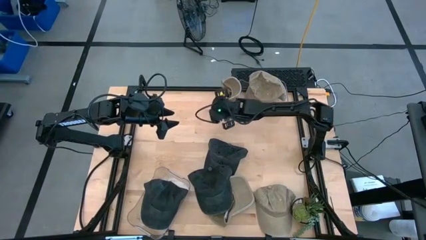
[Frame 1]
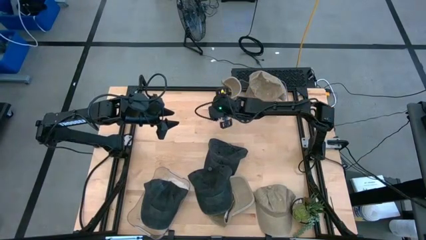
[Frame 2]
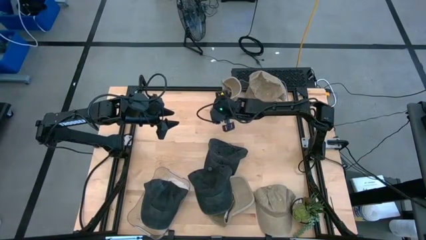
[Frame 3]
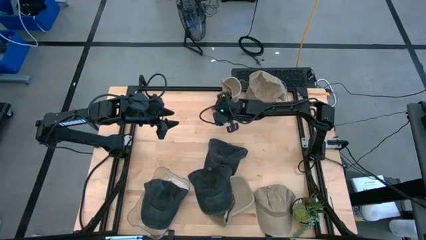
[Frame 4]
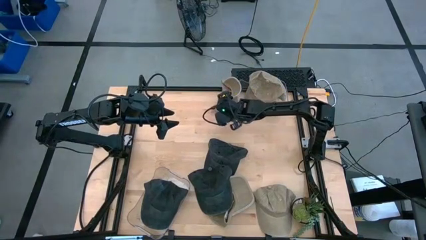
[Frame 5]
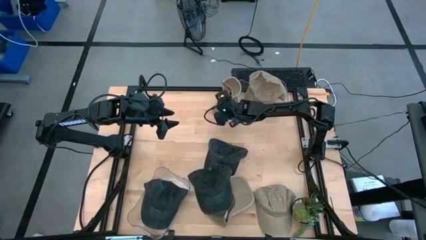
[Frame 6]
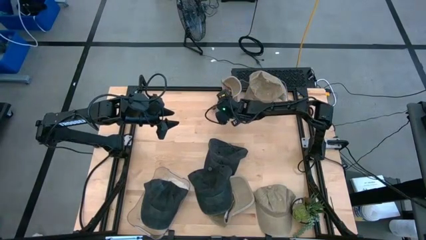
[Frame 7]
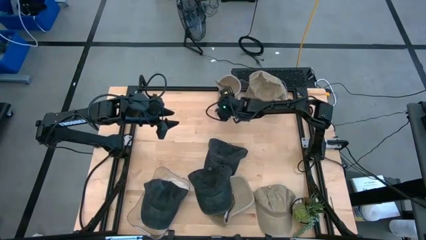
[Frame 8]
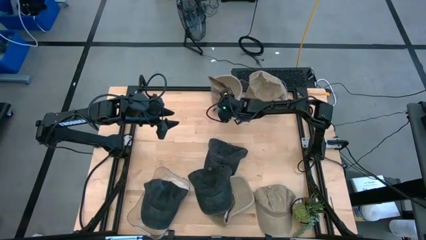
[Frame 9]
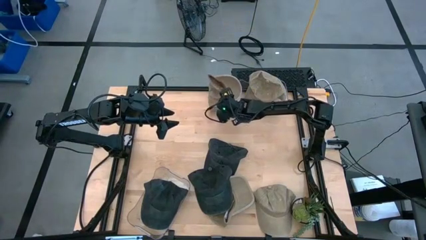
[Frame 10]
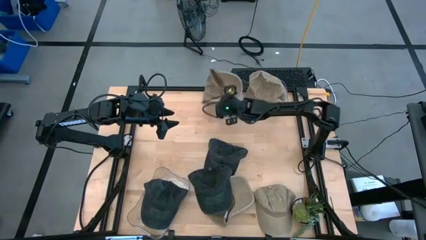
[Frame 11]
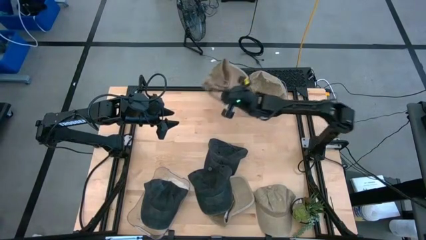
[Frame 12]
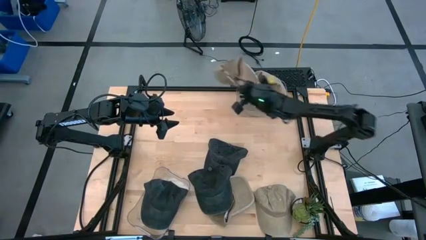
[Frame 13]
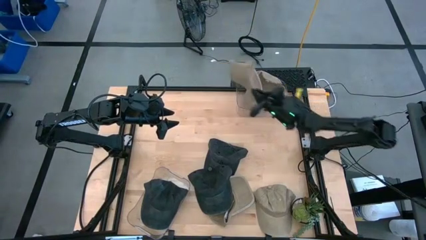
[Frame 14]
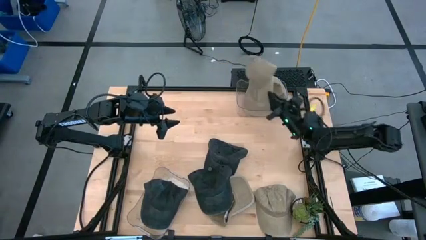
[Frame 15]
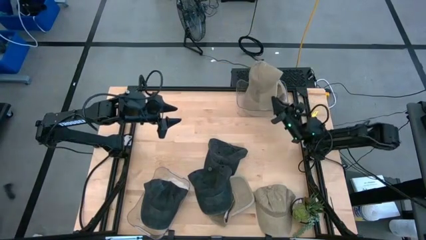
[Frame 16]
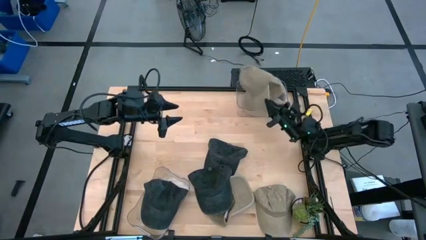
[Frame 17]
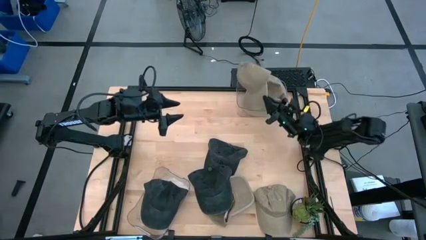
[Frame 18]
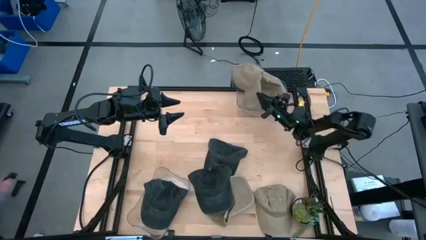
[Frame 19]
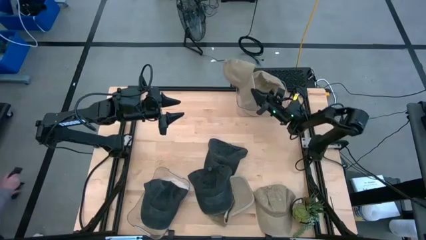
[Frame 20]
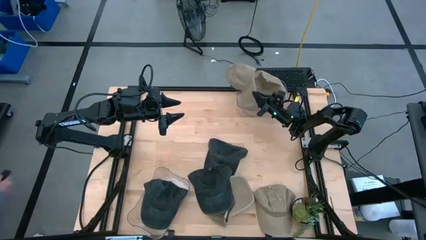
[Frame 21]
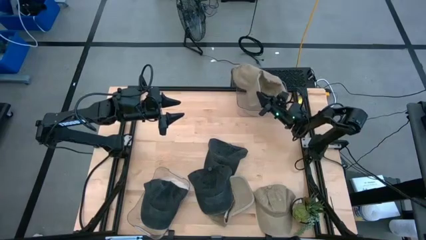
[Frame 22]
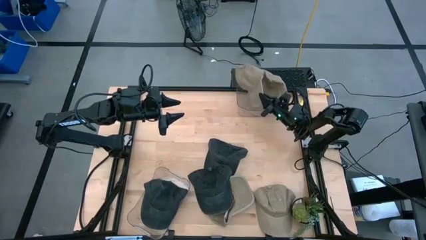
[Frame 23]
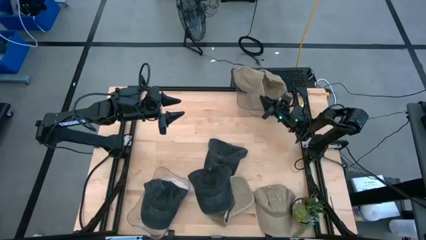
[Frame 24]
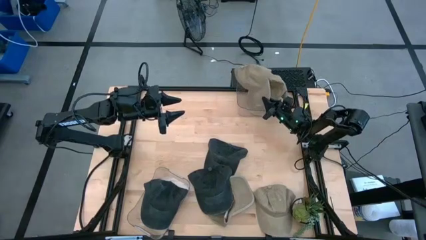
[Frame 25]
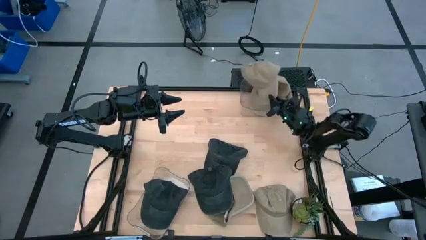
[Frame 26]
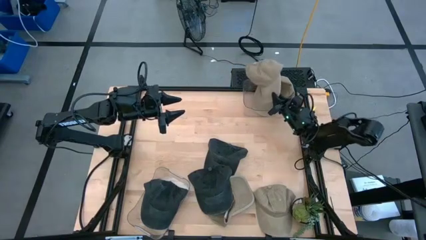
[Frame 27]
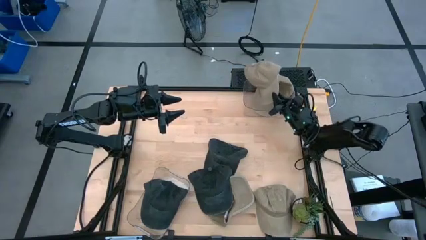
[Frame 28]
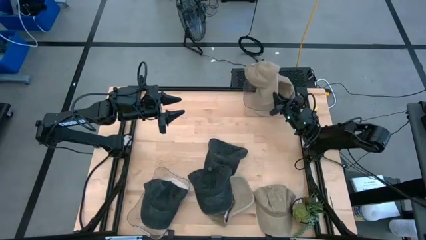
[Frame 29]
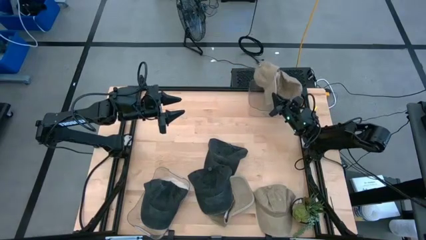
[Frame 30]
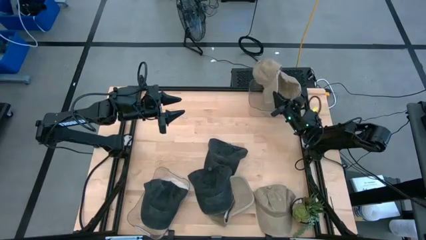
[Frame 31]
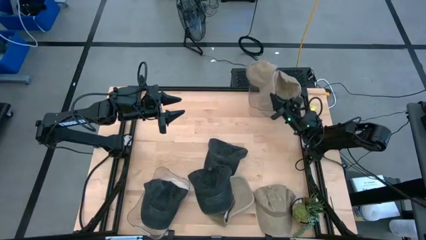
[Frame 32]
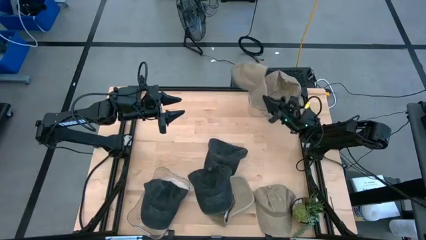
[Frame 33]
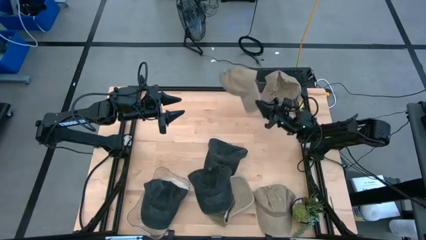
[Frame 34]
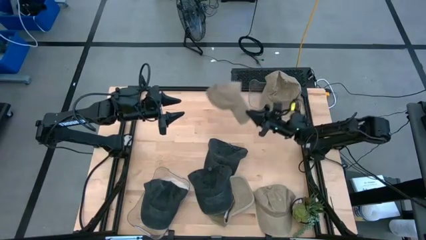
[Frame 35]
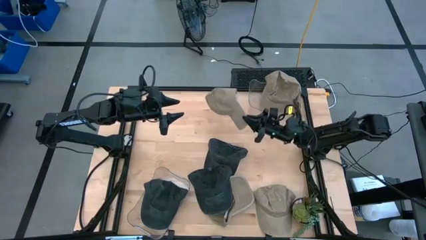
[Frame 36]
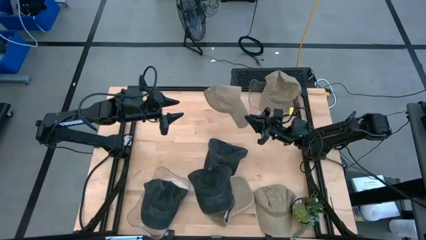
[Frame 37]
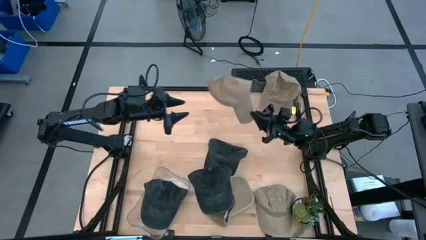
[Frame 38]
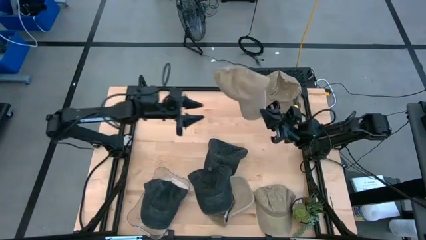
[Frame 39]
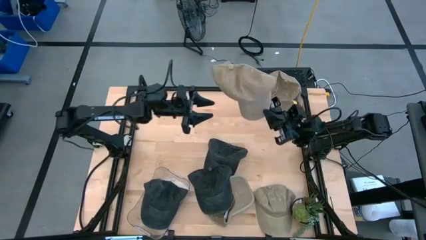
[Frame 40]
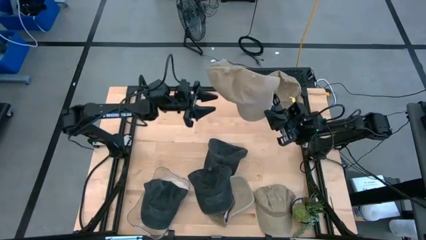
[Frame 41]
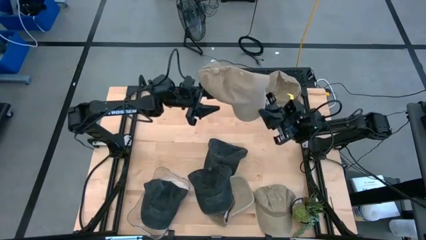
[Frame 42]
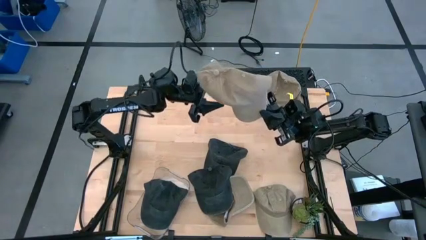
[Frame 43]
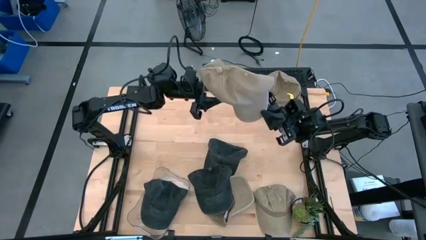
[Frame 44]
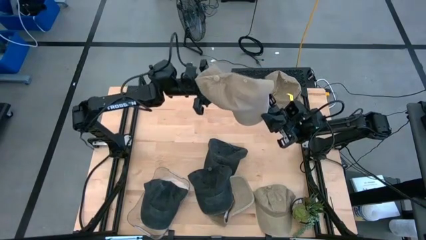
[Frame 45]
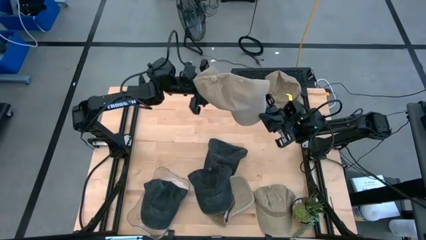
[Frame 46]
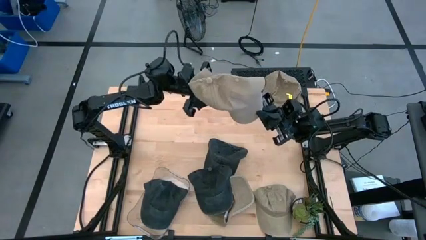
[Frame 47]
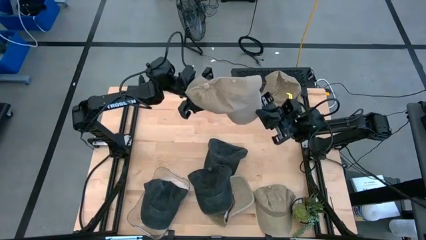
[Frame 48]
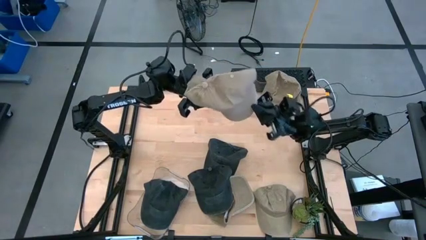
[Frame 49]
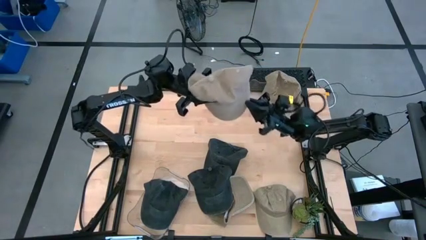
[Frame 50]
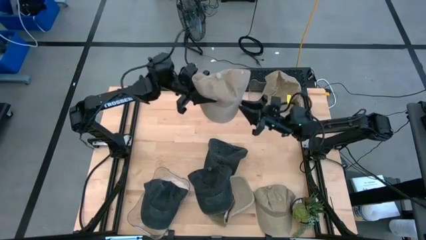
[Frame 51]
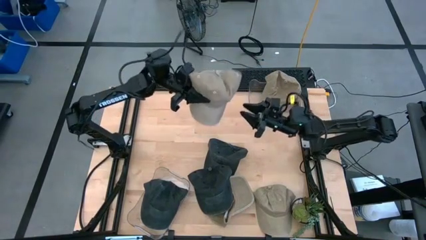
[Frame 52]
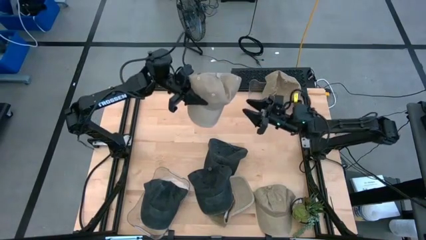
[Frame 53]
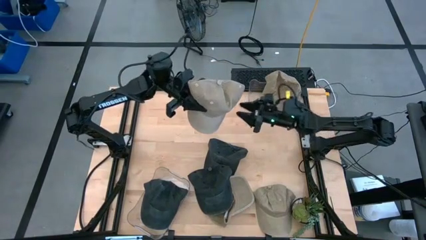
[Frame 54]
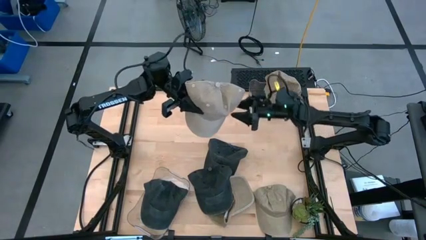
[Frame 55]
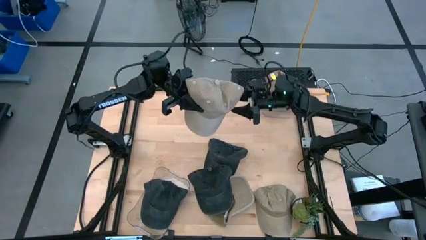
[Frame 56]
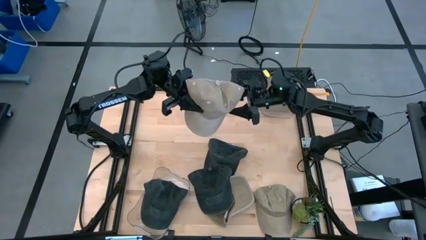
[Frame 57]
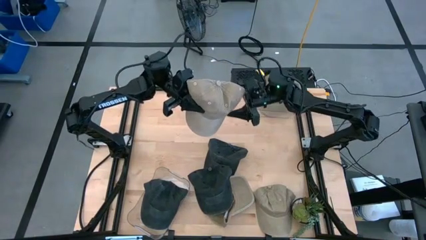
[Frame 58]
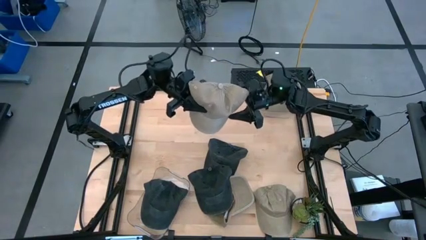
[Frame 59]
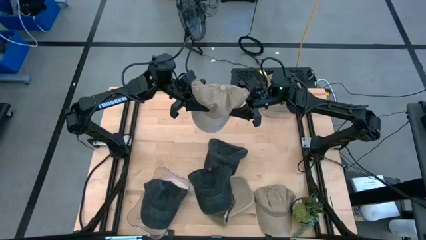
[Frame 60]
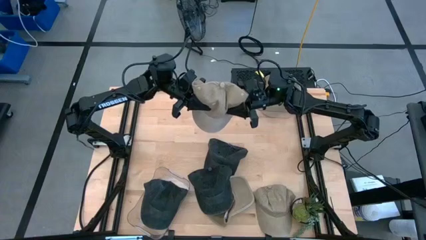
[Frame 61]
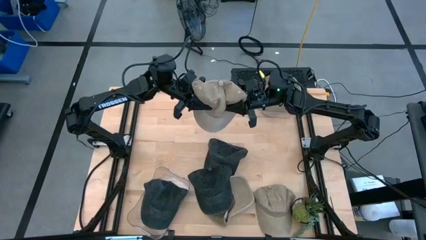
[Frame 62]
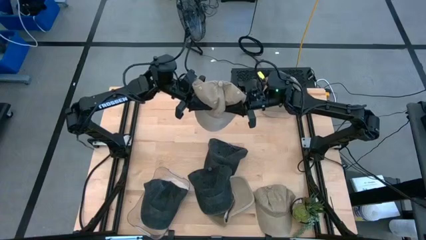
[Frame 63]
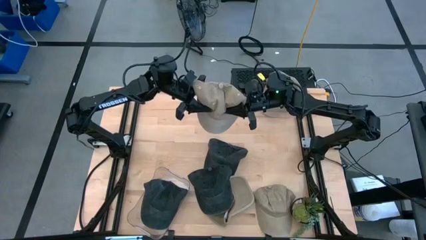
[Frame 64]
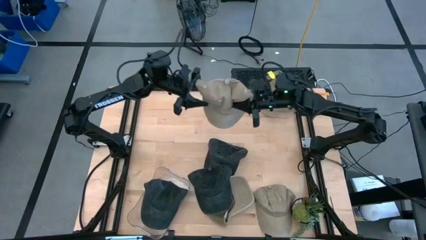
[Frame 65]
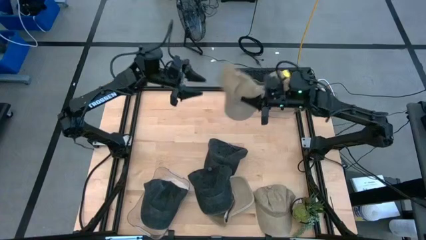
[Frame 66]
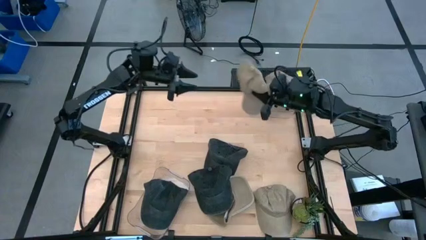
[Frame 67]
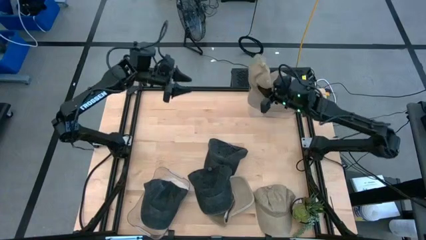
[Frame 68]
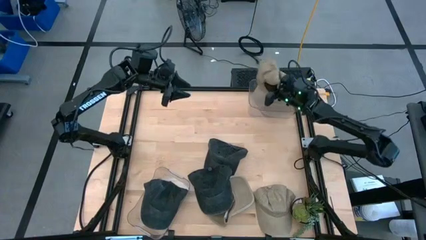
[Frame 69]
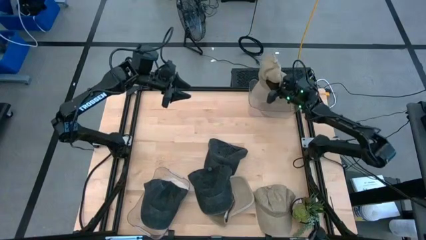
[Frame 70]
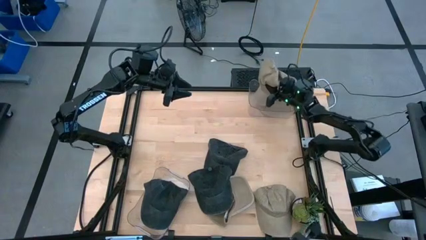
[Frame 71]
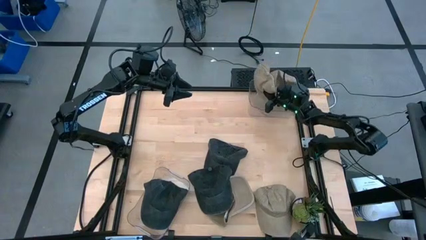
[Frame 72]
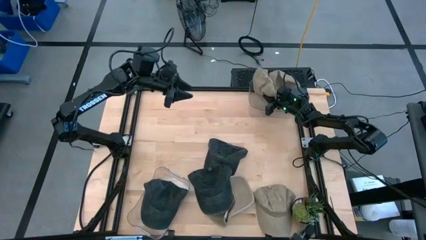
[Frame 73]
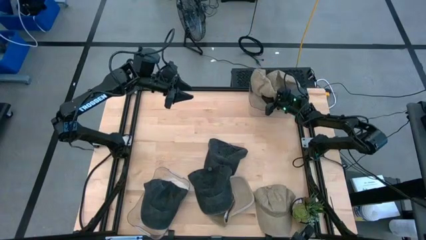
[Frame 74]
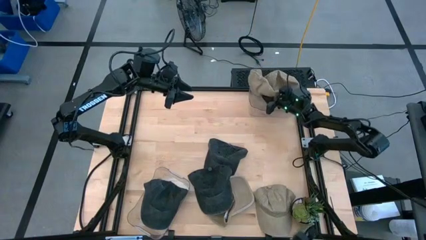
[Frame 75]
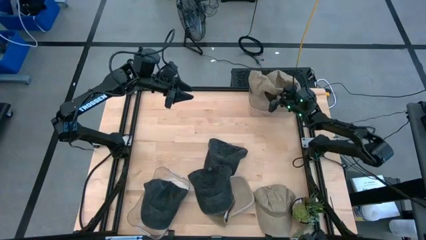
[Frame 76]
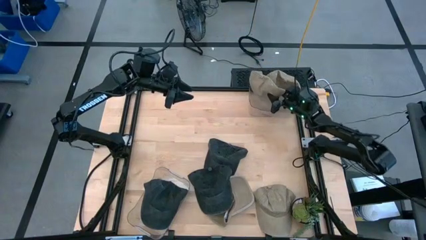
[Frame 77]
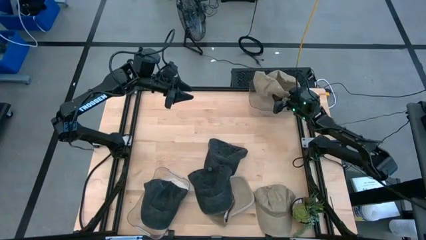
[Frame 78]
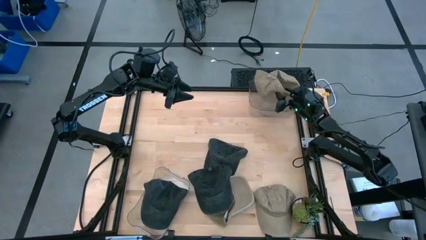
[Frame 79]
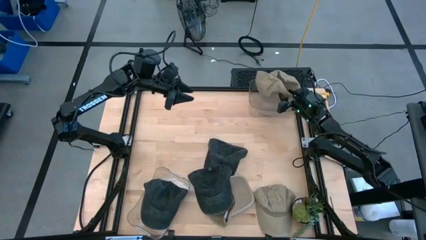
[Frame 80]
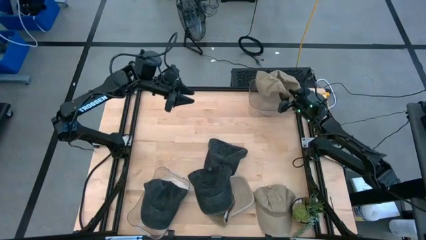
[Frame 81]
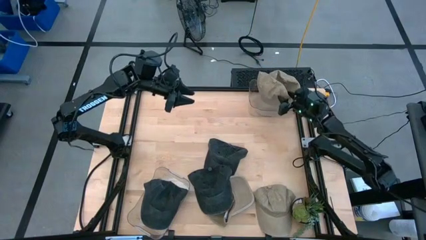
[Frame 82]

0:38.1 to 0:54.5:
Task: Pick & Place hat
Put the brown cap into the top transparent bin
